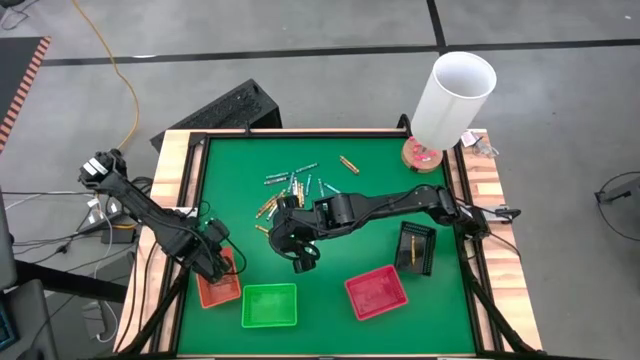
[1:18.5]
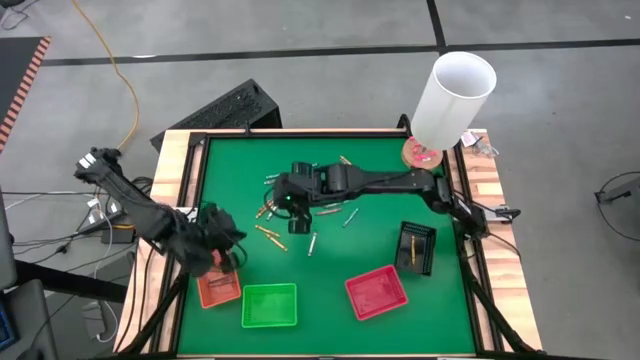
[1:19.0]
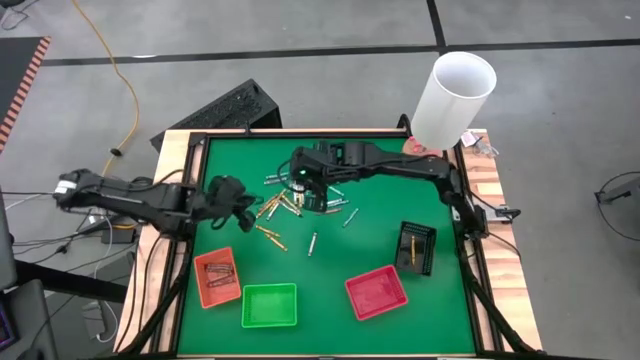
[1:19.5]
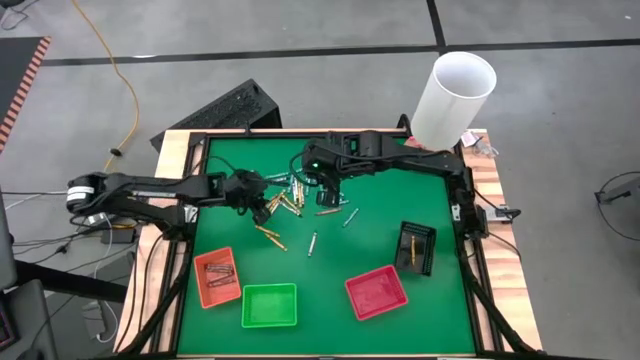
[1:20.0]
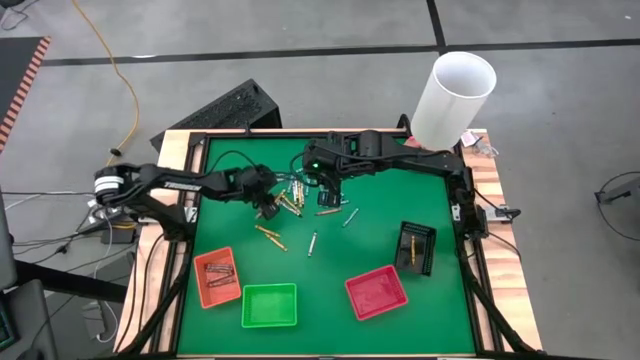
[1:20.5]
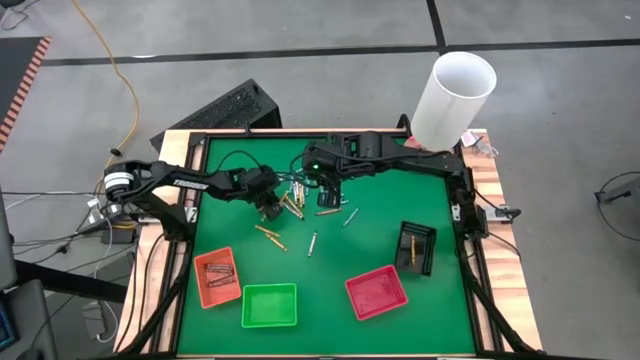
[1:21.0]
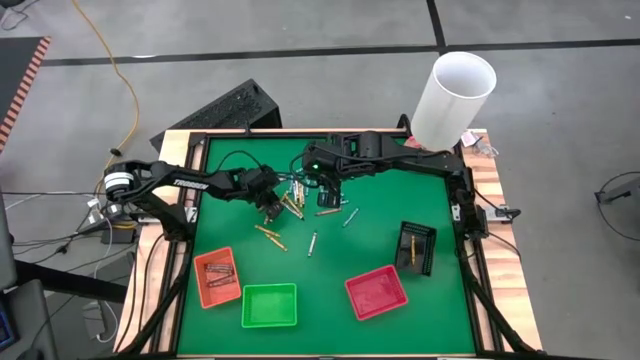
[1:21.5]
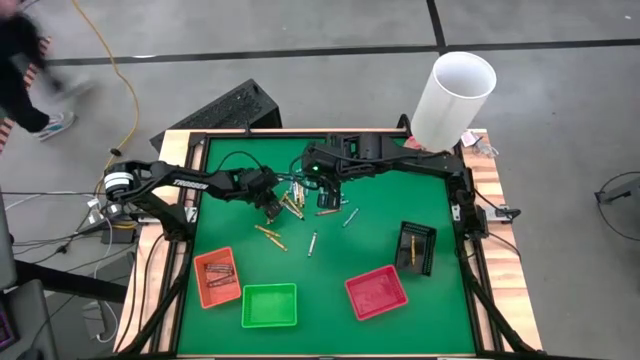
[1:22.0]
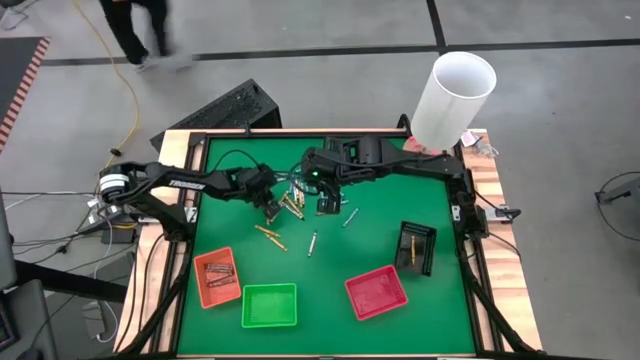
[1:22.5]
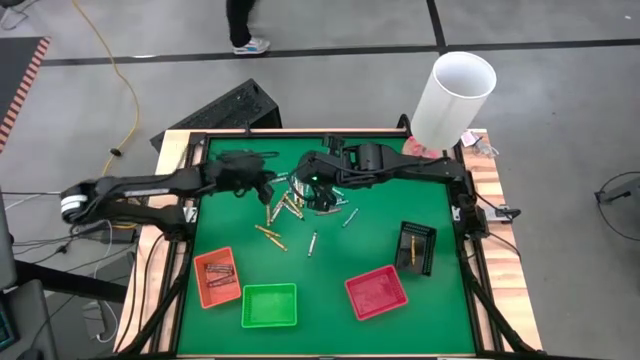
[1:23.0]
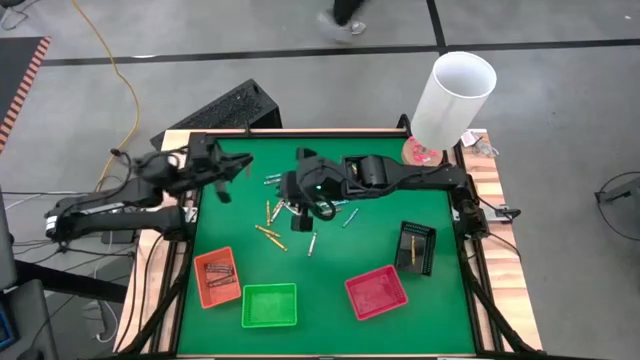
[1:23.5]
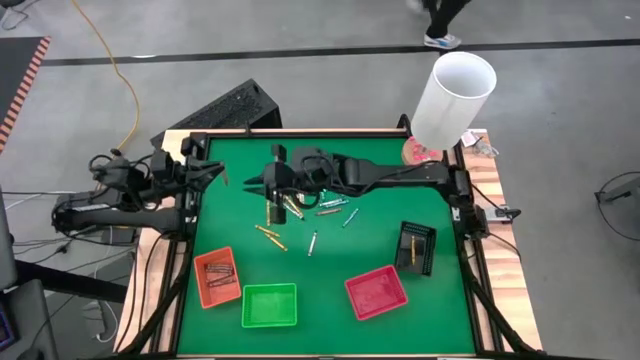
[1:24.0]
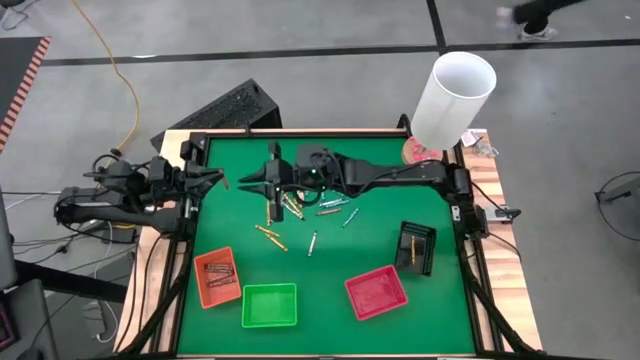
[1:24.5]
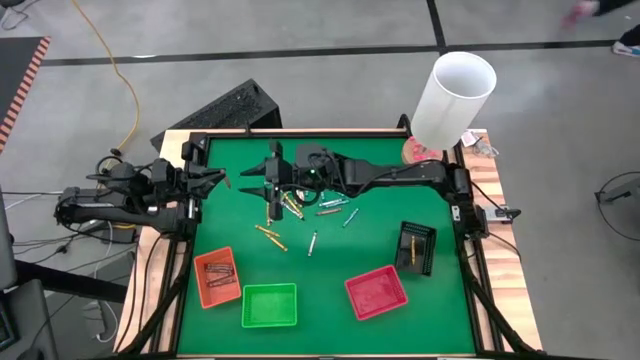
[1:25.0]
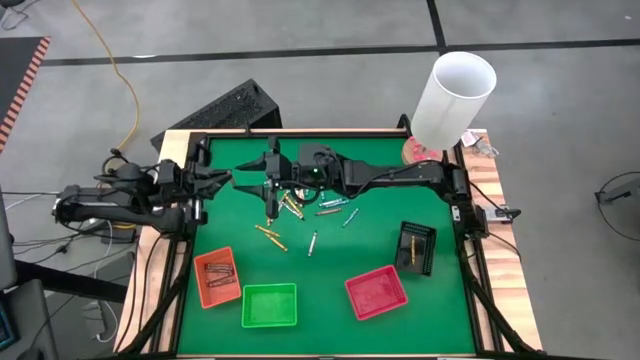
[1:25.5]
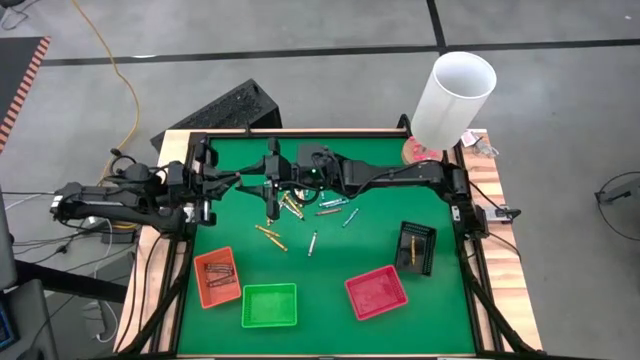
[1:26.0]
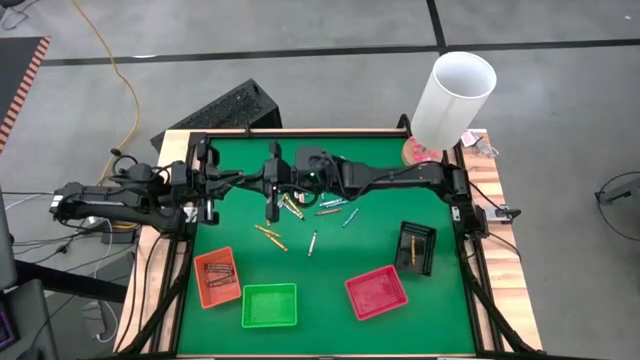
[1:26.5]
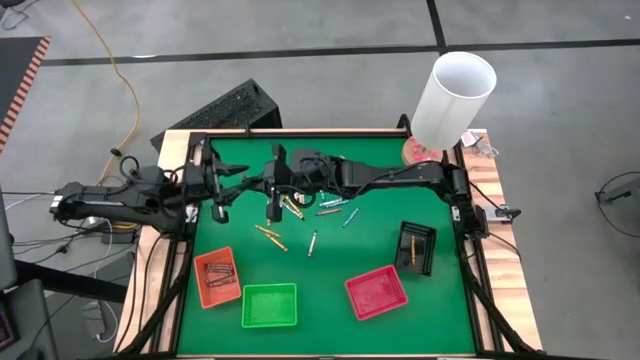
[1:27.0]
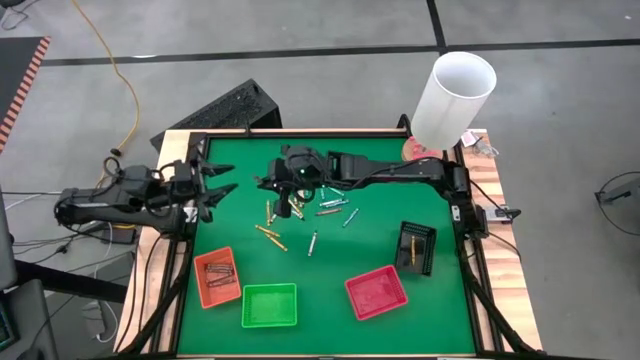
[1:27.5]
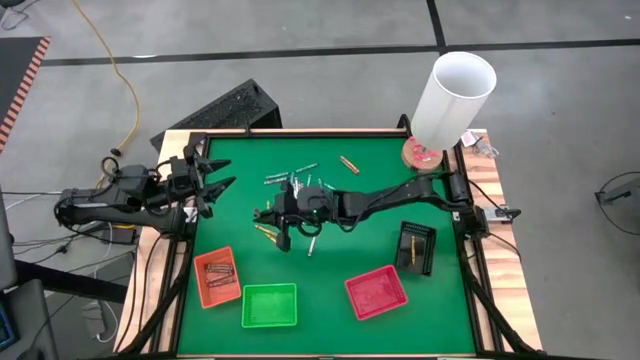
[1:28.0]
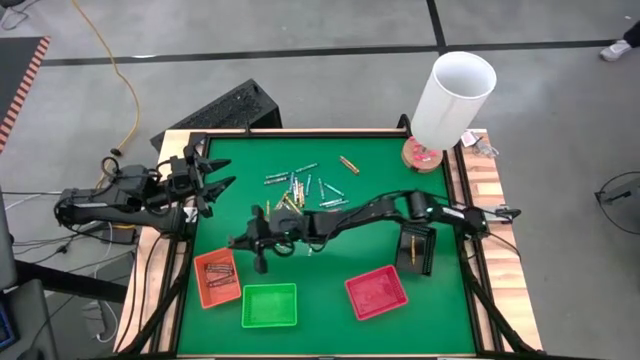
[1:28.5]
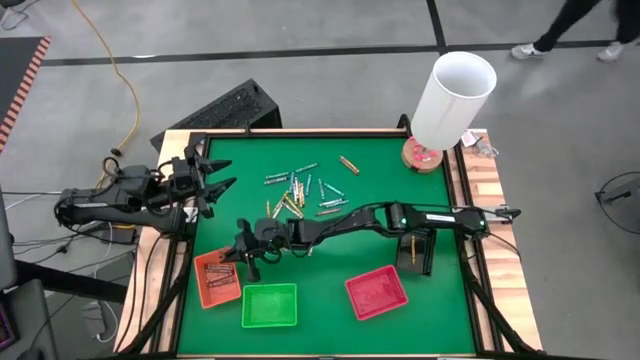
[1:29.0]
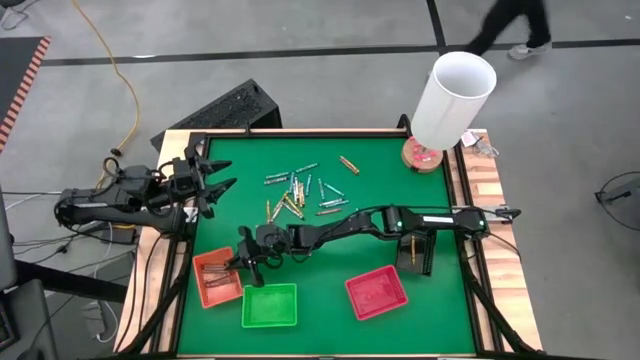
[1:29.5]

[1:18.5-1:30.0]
Task: Sort crayons
Put the brown crayon into the orange bin

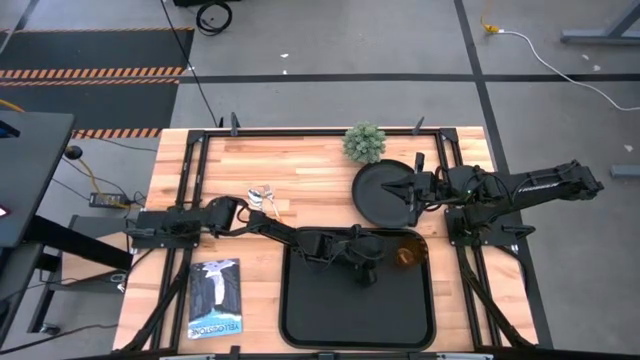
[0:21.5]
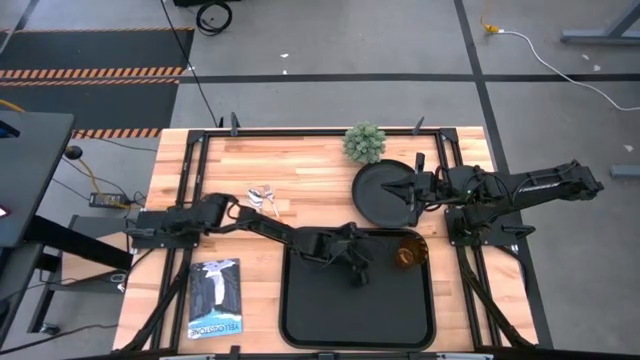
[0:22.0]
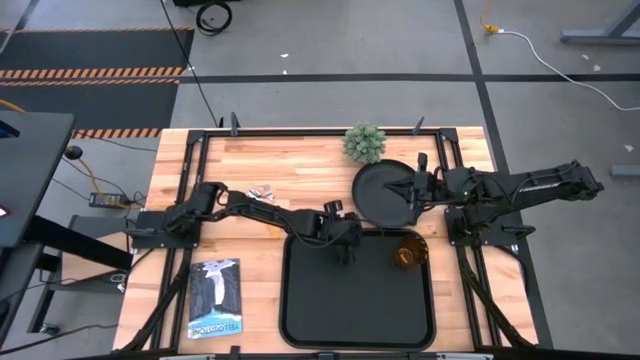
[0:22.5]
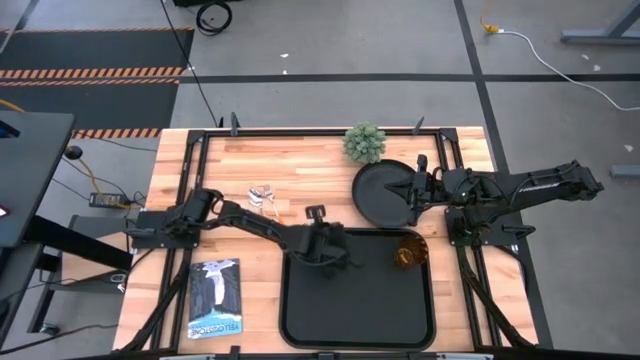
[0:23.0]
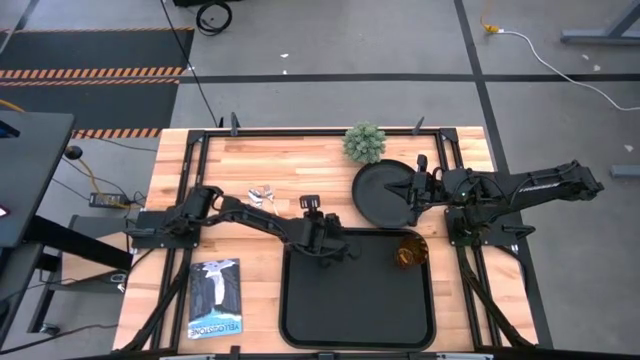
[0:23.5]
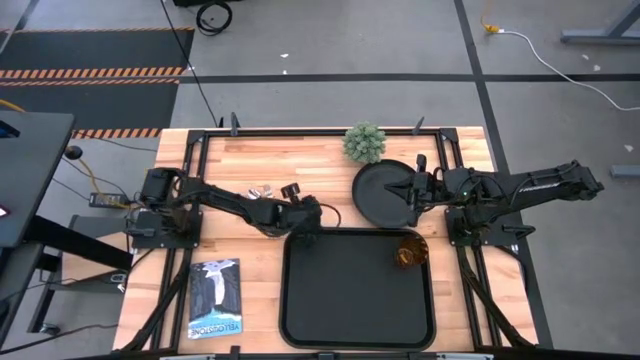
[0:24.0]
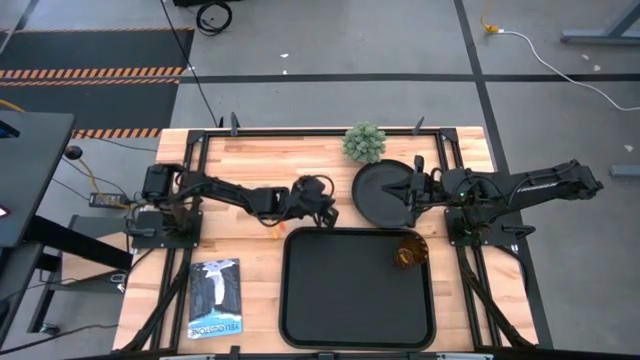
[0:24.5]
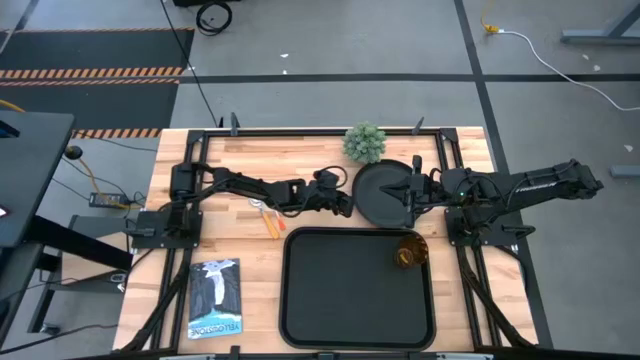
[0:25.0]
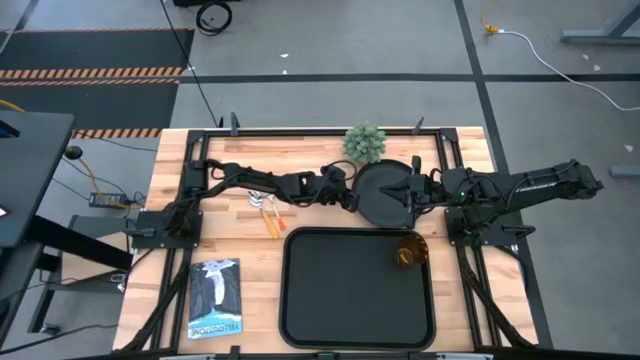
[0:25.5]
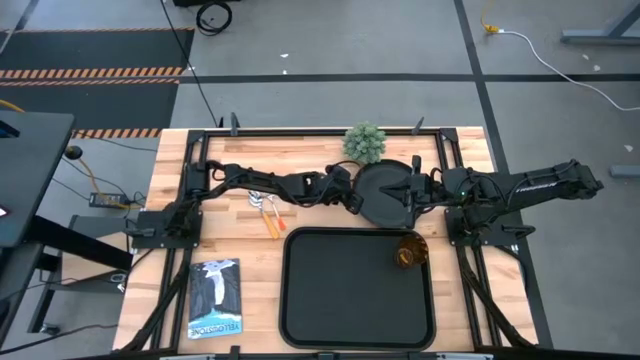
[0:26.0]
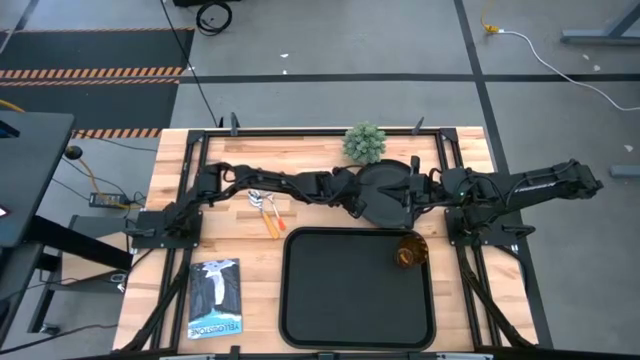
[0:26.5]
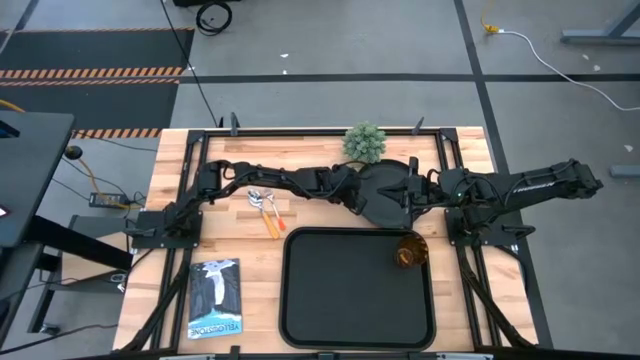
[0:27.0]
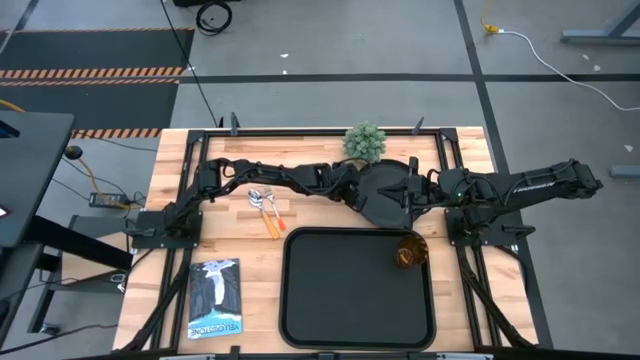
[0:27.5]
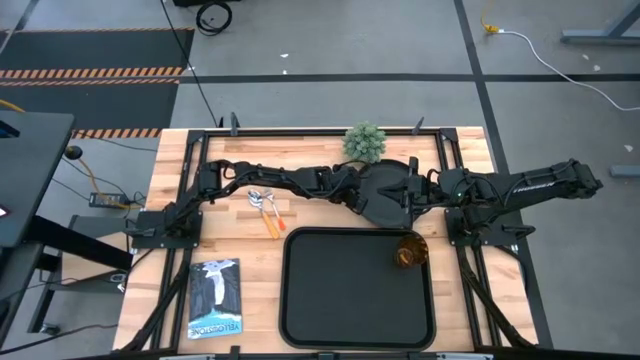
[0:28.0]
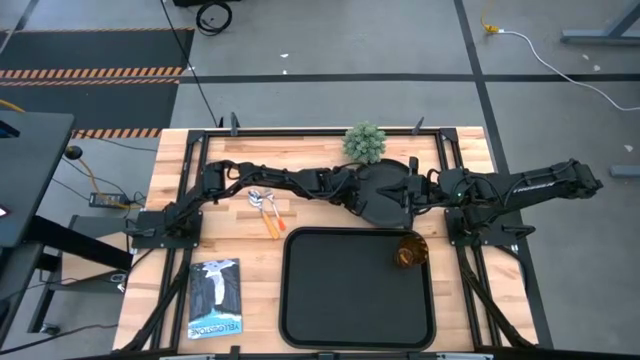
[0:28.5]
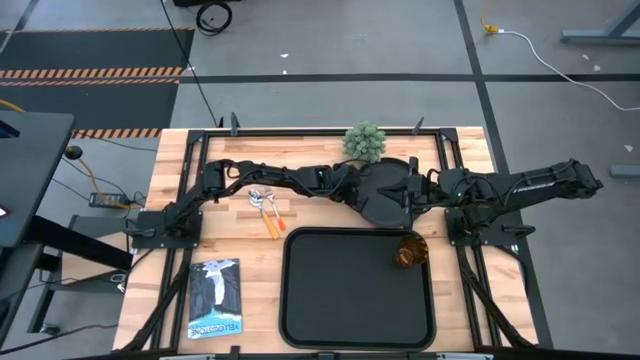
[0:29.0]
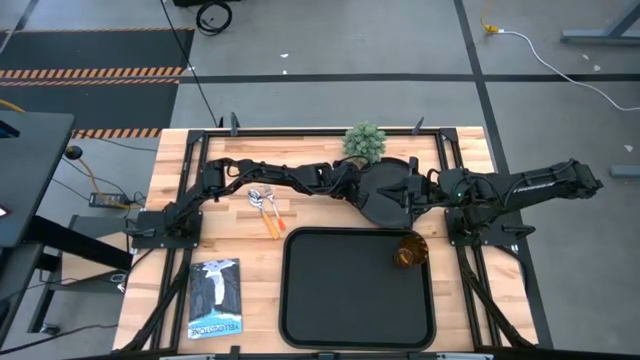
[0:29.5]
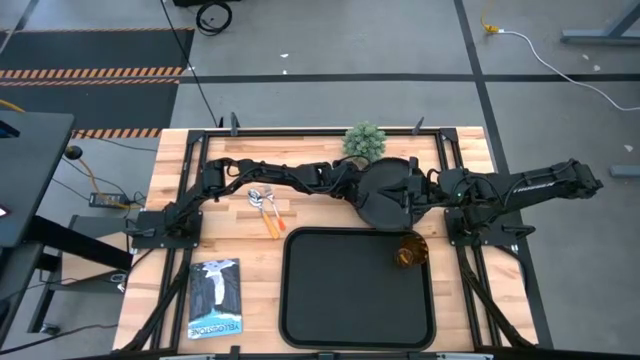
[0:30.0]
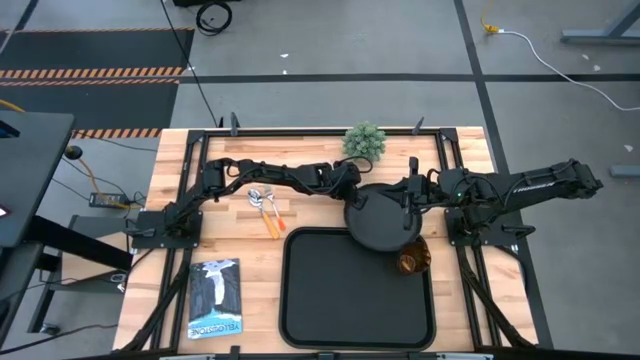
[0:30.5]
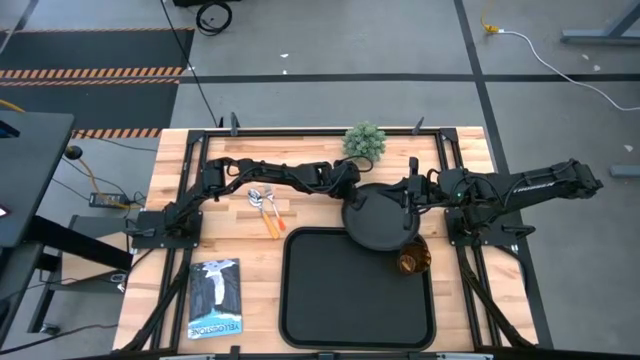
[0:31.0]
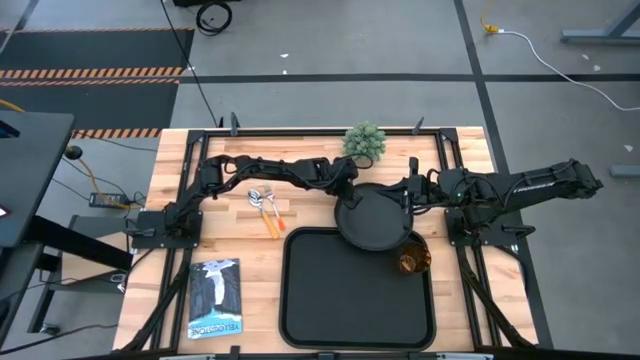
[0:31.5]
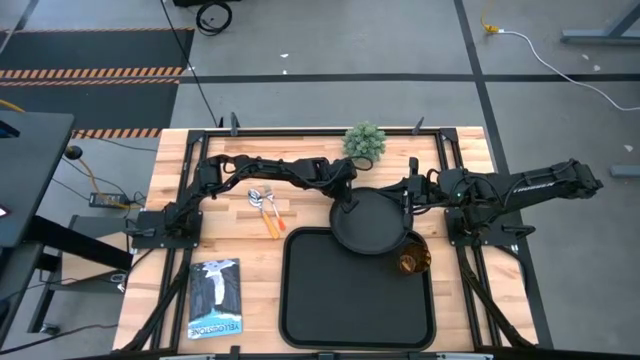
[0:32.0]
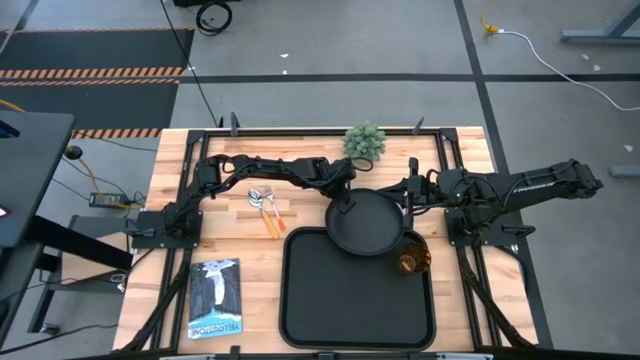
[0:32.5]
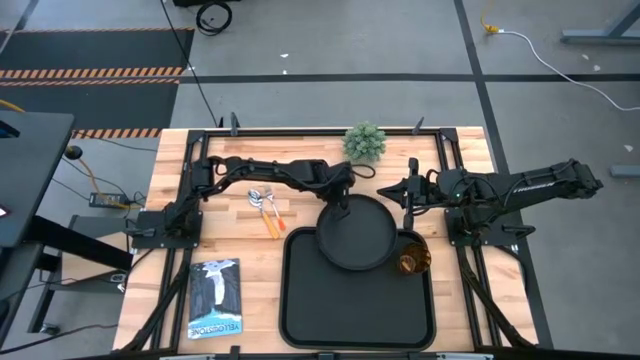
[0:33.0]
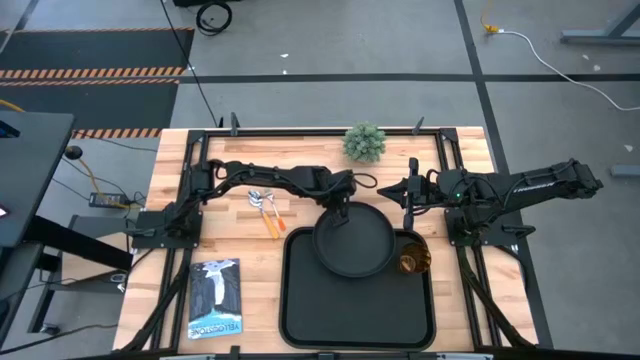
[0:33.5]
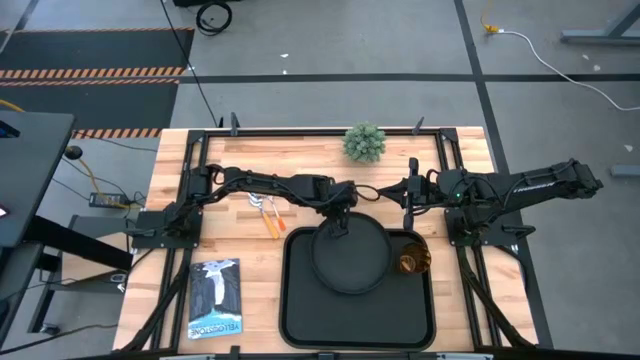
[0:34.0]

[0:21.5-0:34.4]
Task: Pick and place plate/cup/fork/spoon on tray
Put the black plate to the bottom left of the brown cup on the black tray
